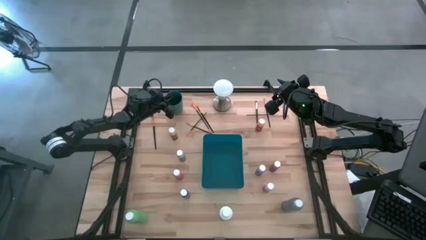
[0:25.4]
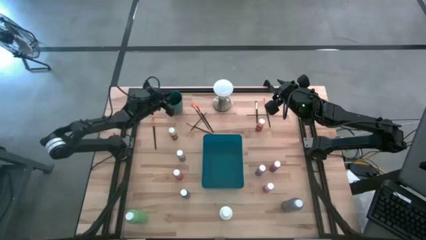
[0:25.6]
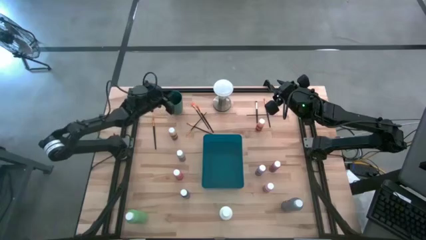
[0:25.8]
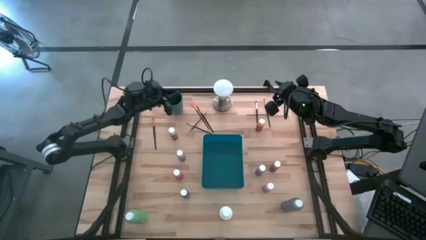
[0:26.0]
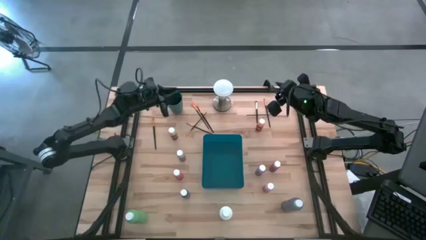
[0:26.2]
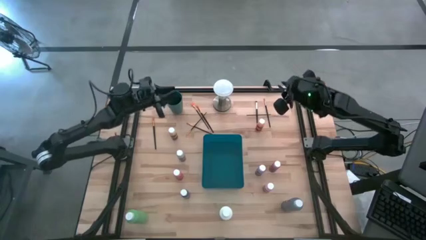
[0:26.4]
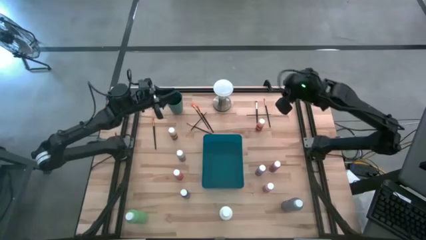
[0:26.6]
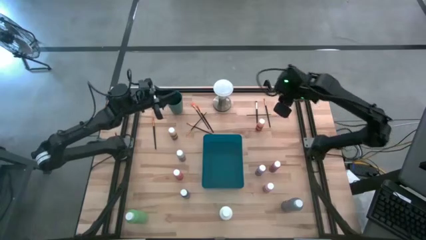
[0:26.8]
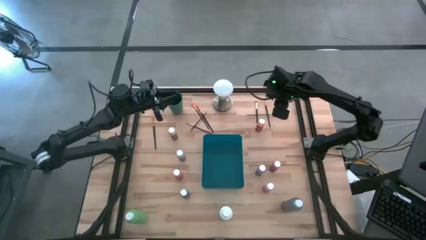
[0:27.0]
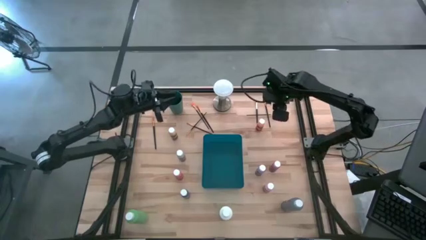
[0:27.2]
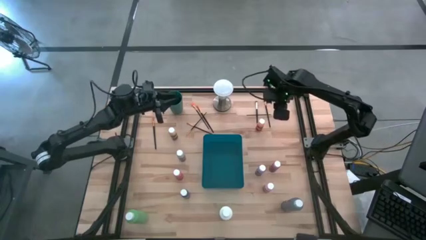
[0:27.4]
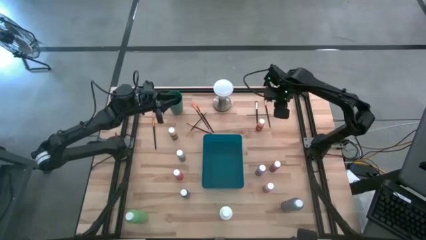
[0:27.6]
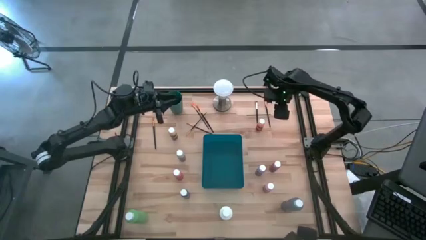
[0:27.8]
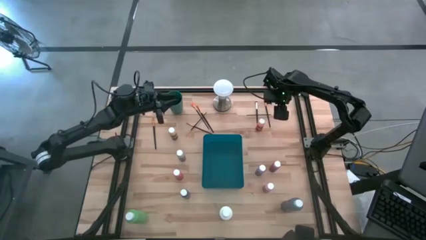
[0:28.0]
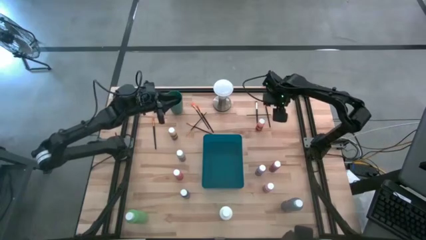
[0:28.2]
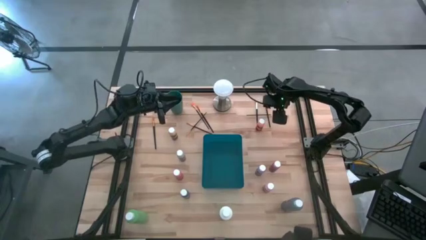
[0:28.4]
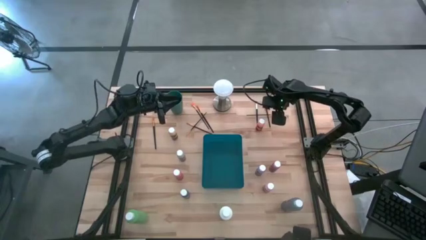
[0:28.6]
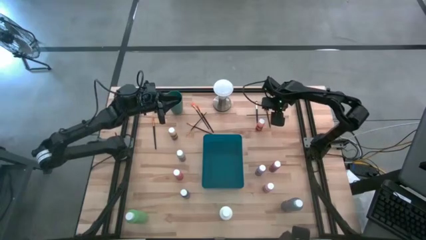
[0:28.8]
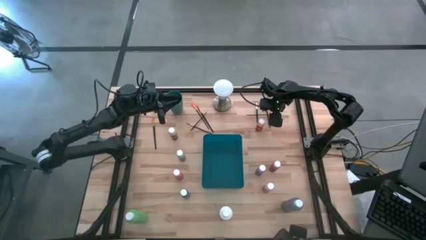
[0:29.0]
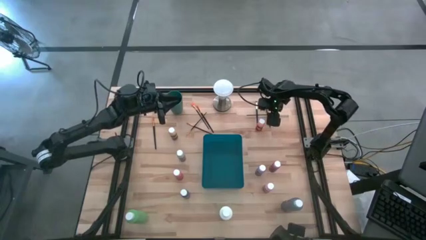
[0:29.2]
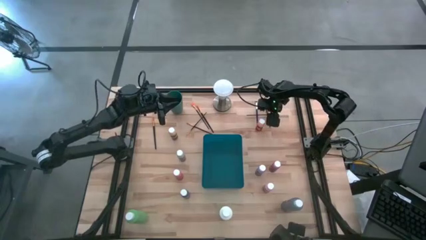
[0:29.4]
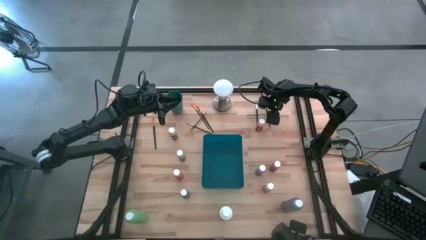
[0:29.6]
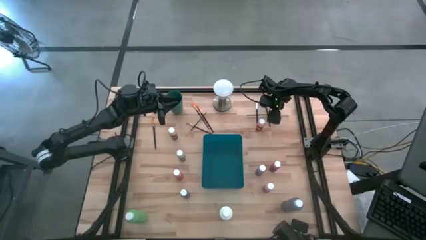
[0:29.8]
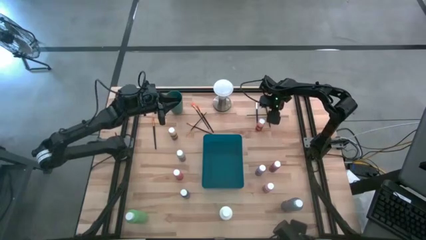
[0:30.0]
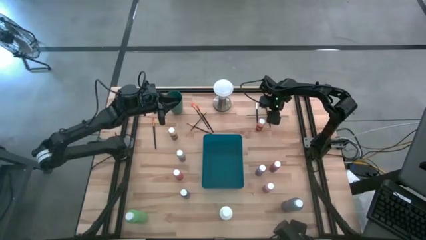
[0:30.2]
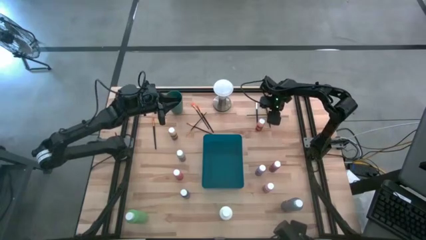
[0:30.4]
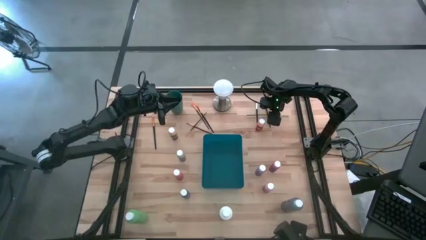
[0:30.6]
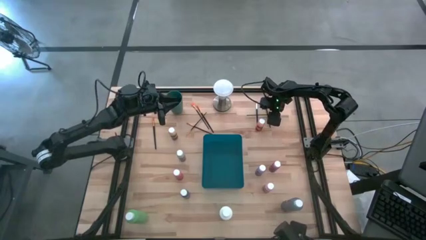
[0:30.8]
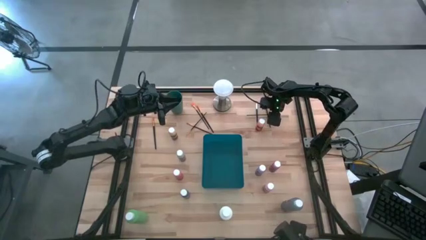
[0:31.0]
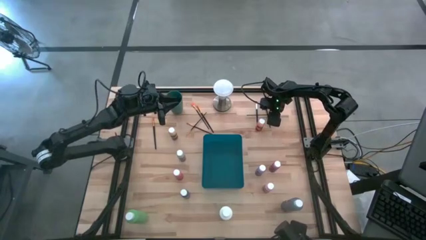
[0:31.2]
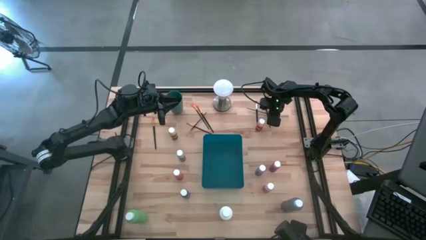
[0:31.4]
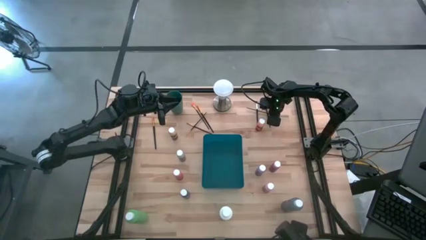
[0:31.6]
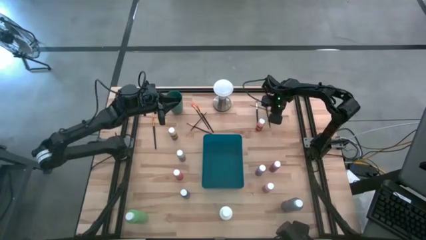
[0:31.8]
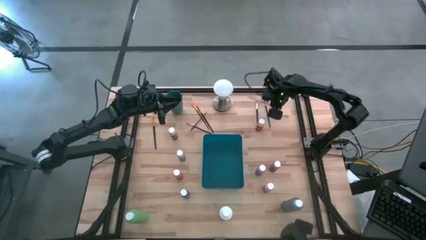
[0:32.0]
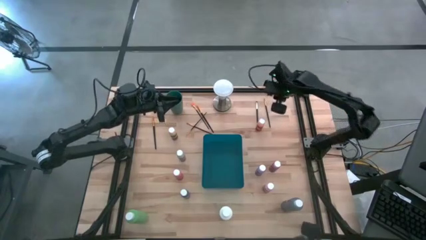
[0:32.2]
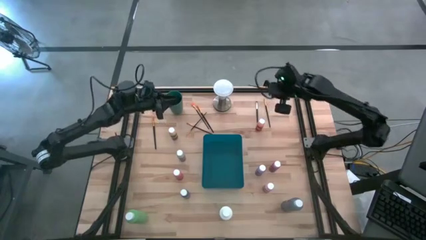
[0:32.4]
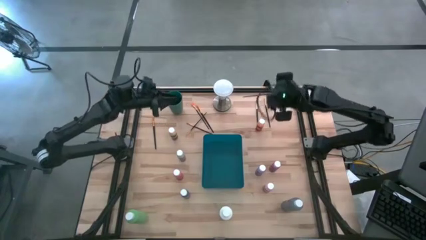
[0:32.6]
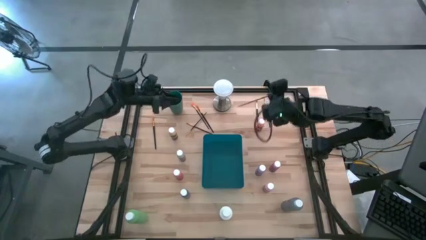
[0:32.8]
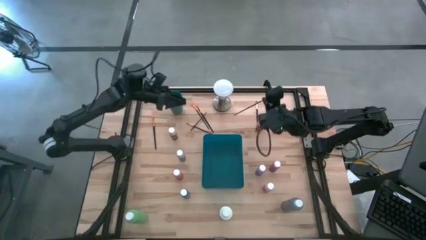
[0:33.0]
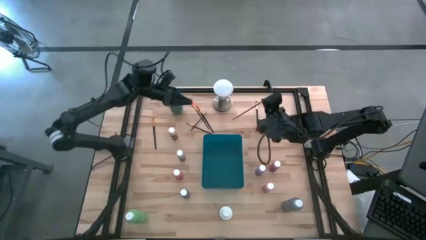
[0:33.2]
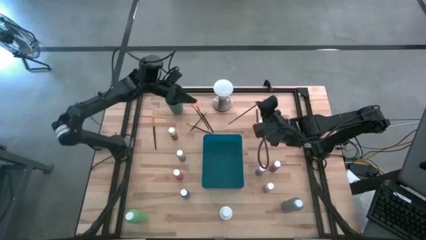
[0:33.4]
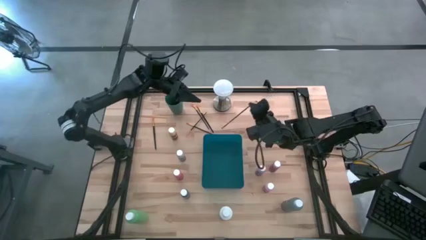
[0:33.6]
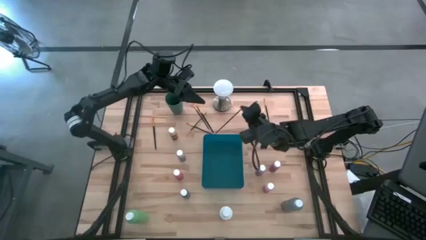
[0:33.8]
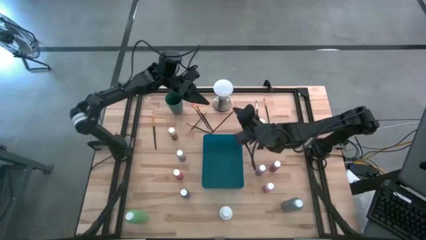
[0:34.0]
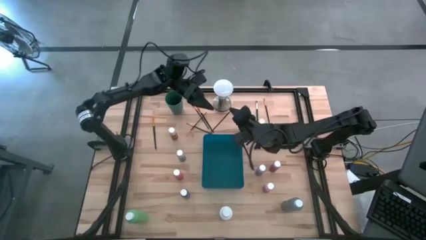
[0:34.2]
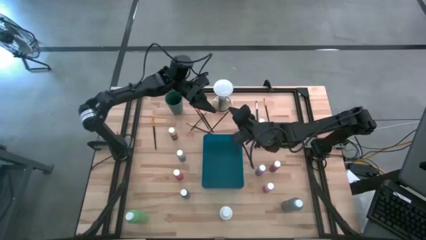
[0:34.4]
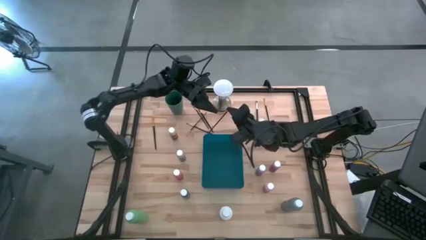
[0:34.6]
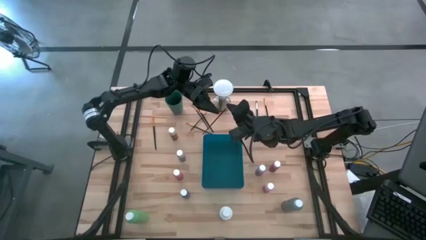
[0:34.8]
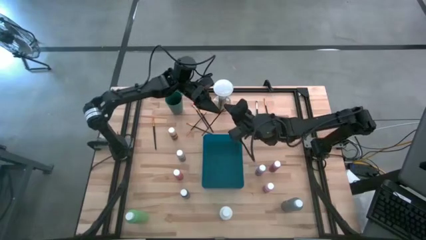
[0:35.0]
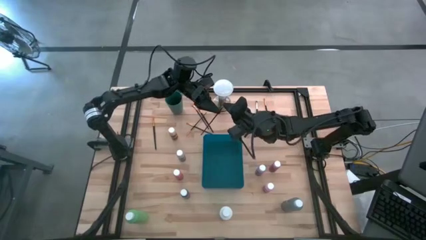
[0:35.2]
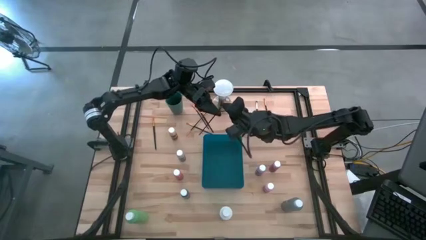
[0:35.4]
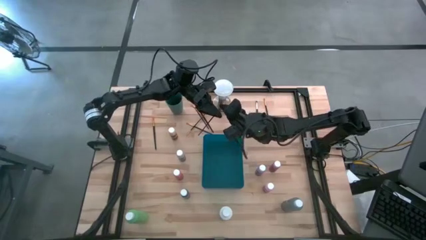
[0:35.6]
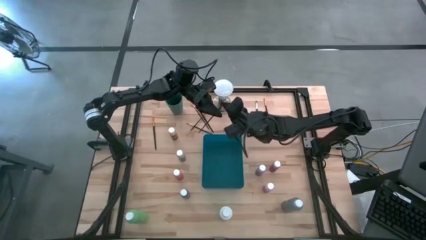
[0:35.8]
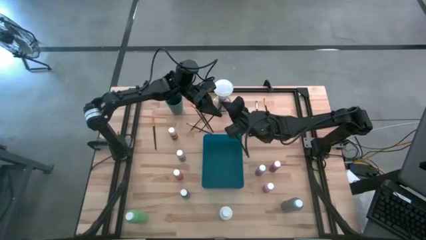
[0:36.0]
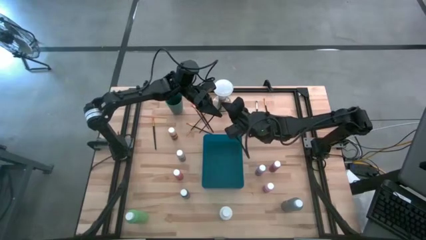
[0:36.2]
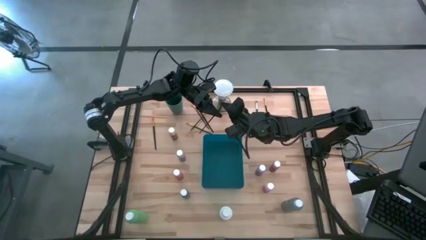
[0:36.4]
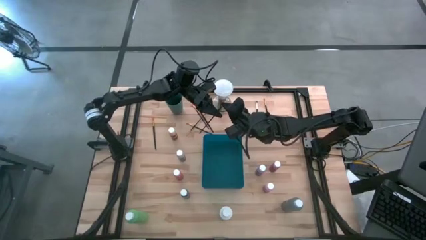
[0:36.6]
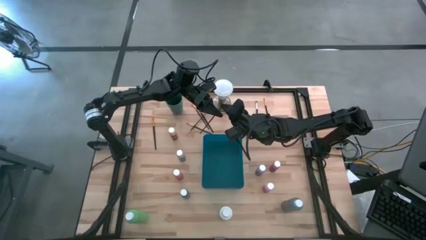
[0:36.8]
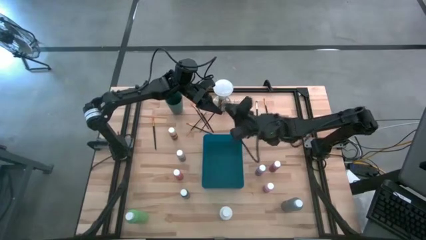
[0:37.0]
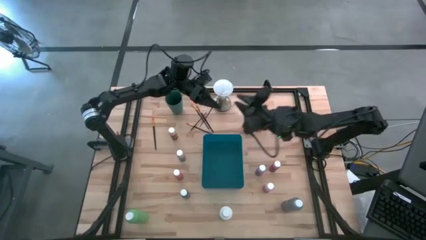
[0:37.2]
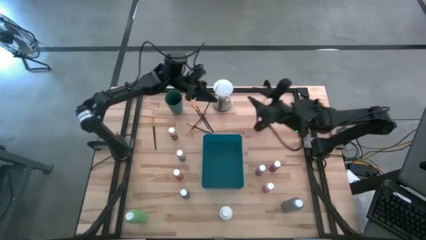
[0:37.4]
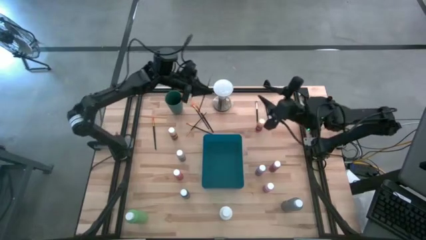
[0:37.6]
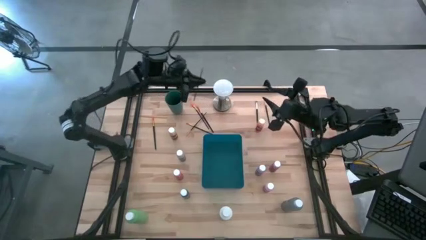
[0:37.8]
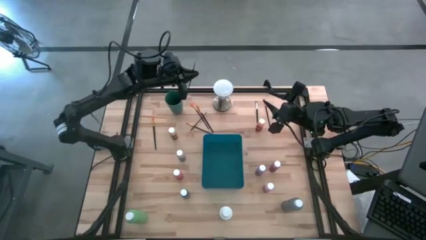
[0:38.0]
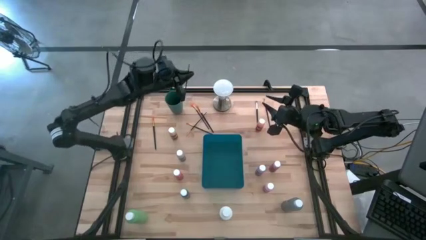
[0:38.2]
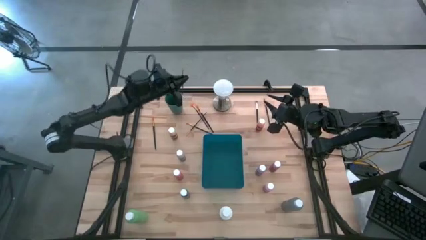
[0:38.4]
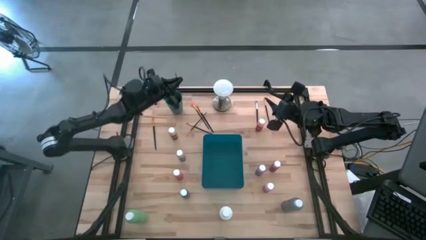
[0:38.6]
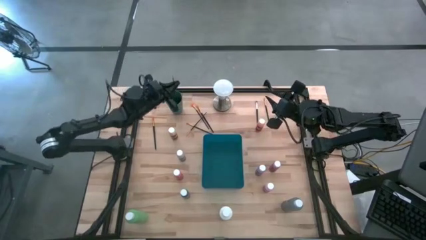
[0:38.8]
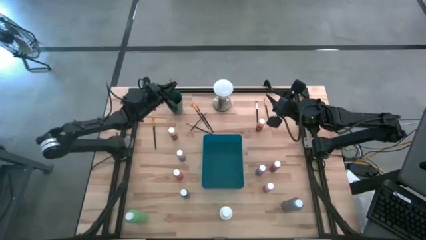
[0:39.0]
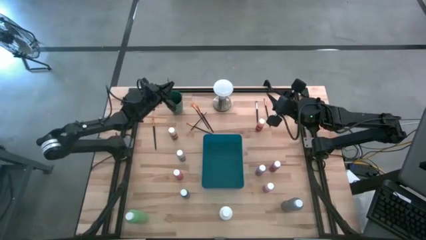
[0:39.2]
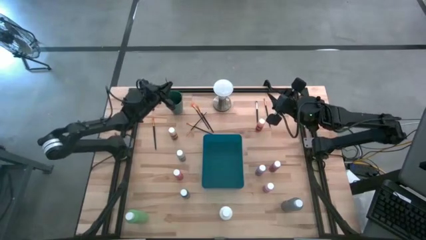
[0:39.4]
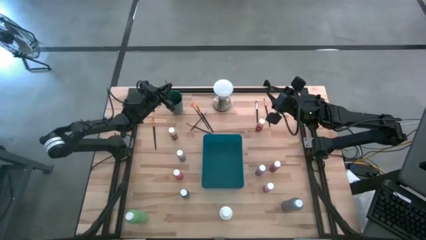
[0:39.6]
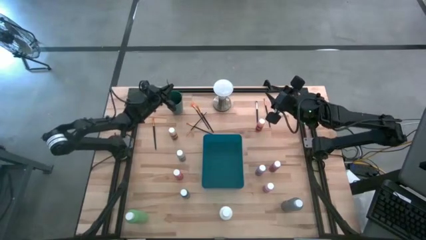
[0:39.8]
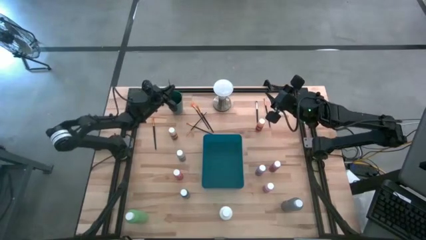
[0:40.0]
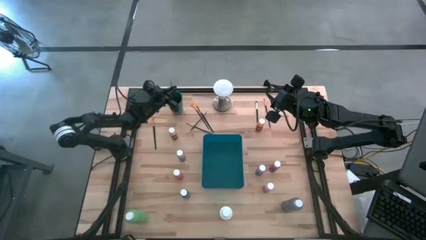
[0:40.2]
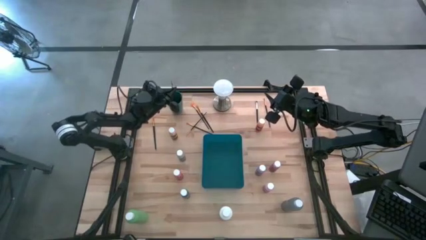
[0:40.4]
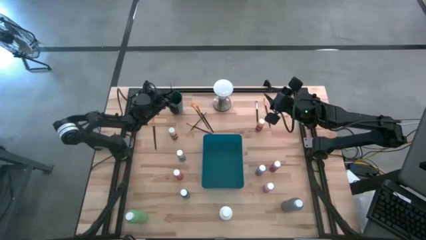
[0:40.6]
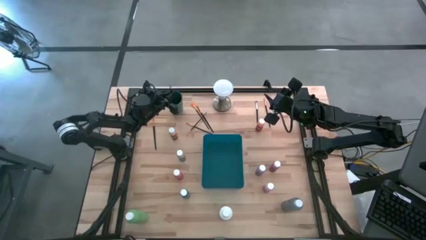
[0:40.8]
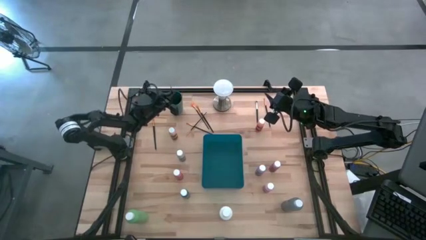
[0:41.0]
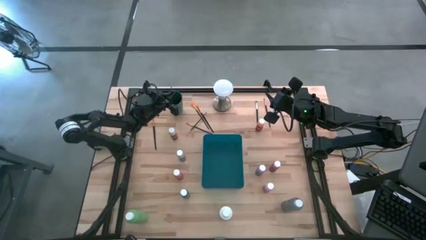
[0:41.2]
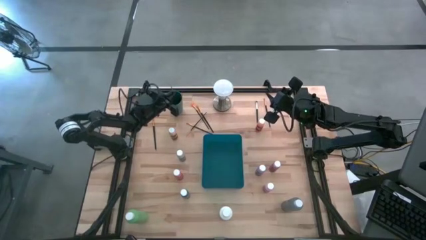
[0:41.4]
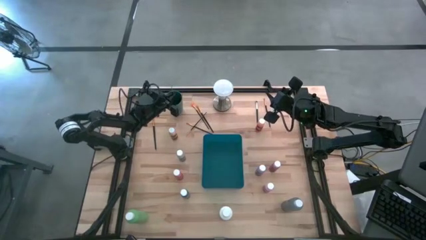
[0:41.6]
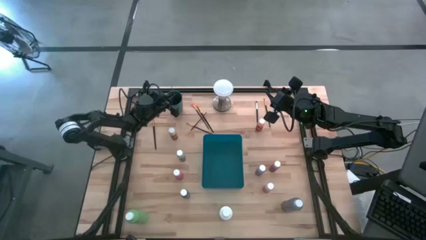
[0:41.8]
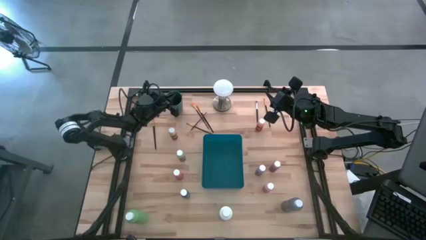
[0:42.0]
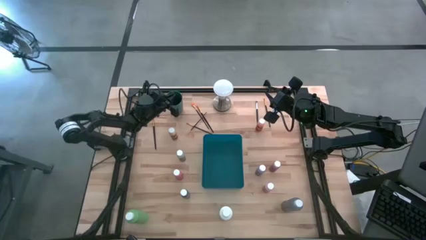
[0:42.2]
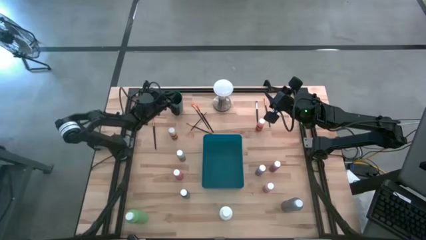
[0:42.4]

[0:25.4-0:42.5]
Task: Pick & Place Paint Supplies
Put the yellow paint brush into the green cup
